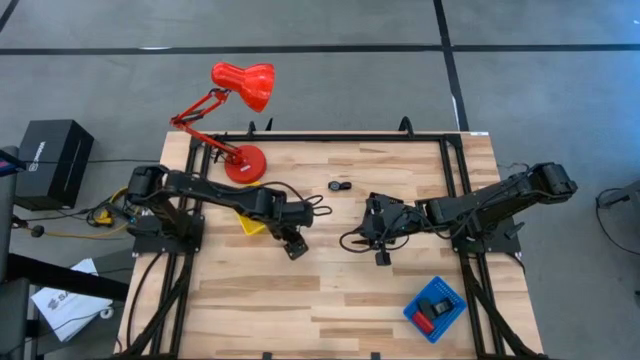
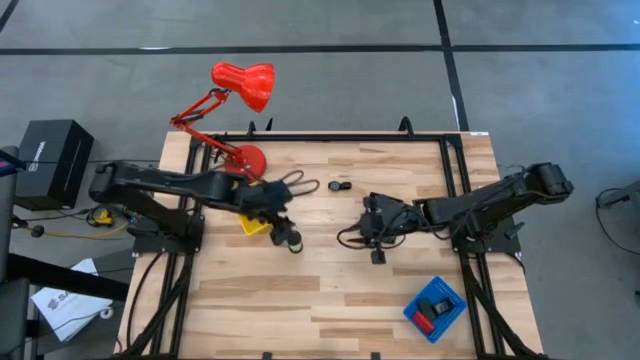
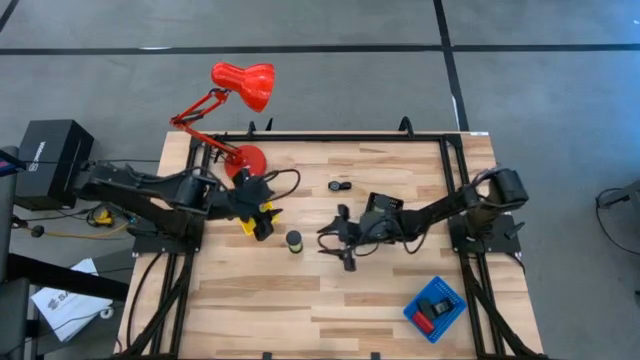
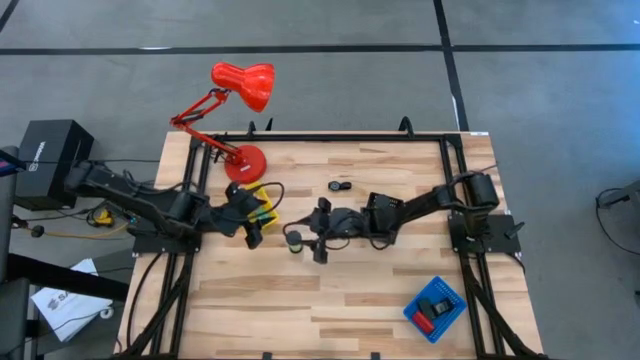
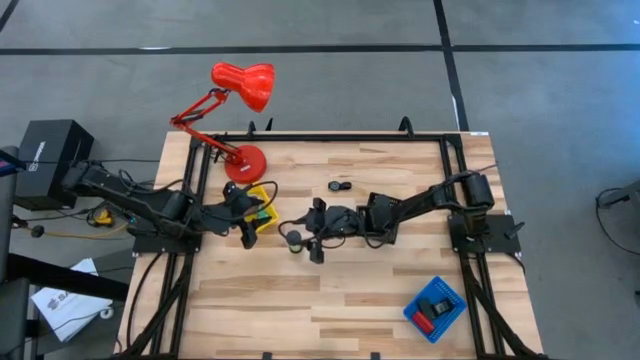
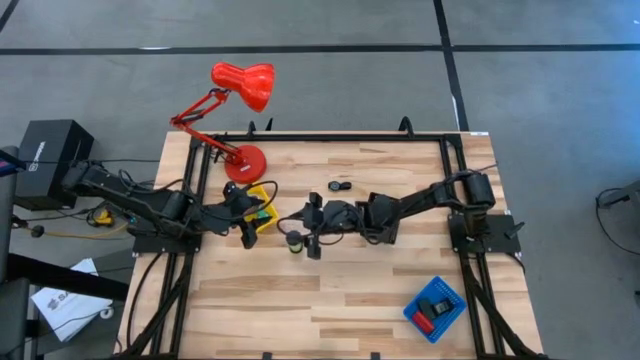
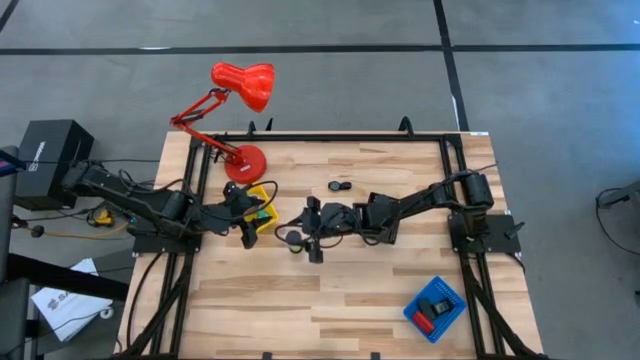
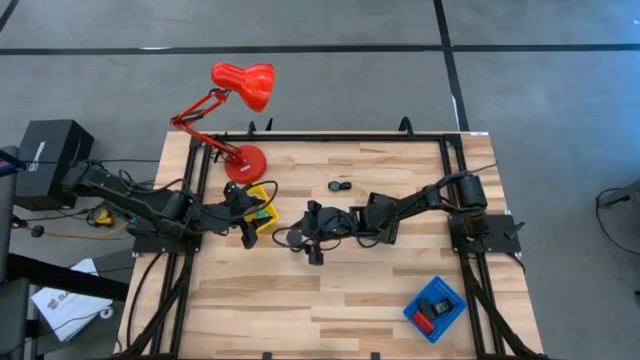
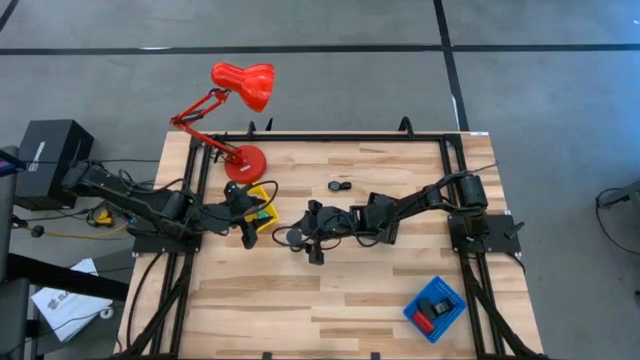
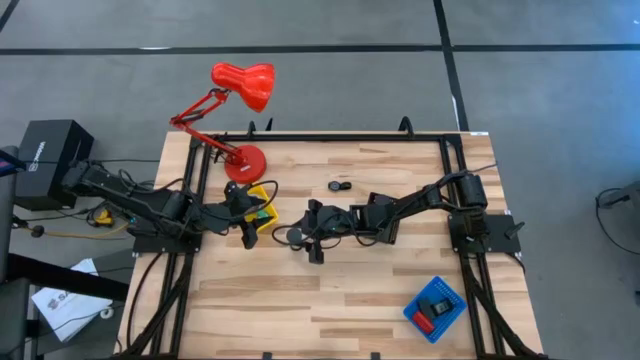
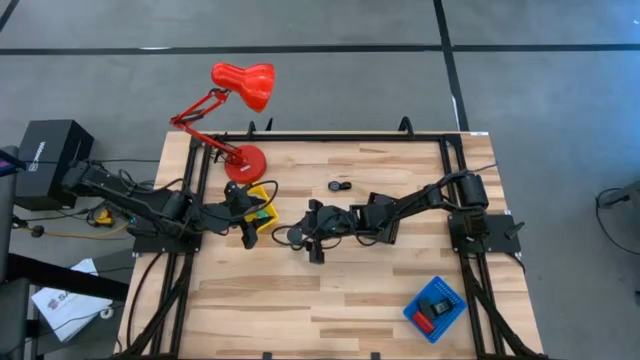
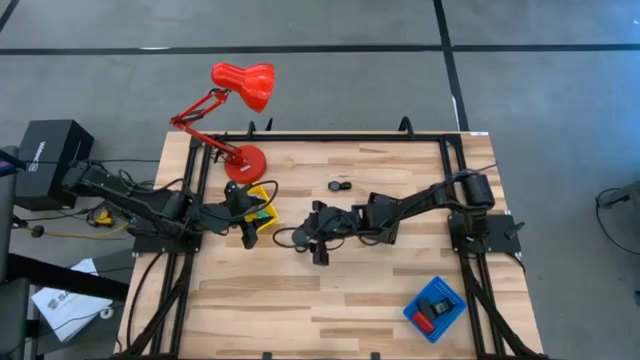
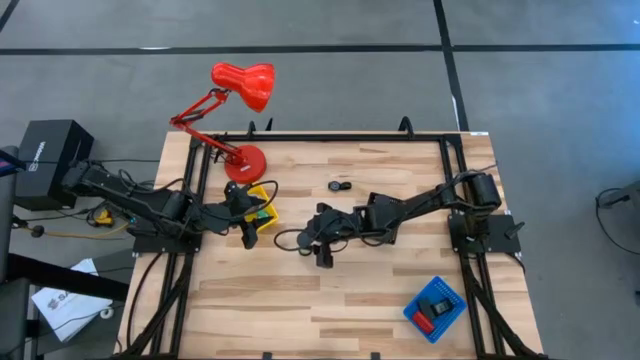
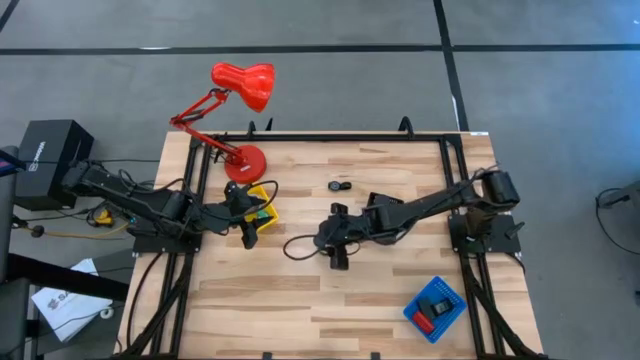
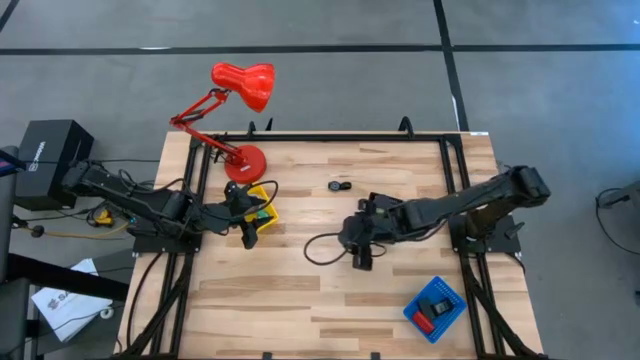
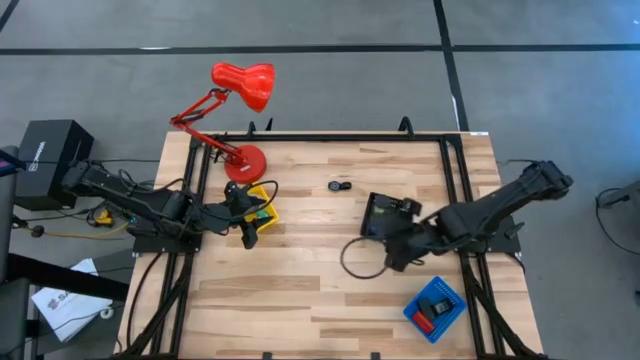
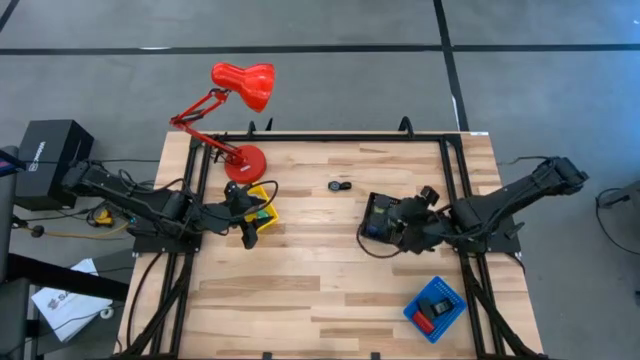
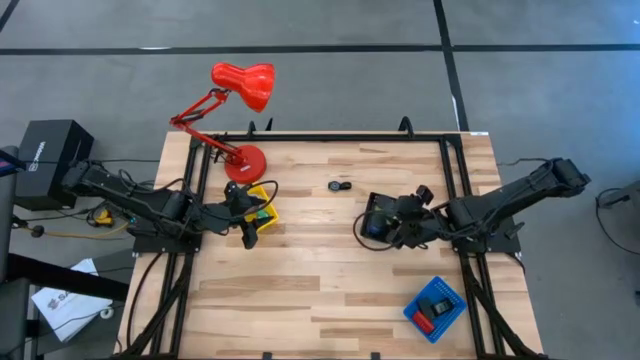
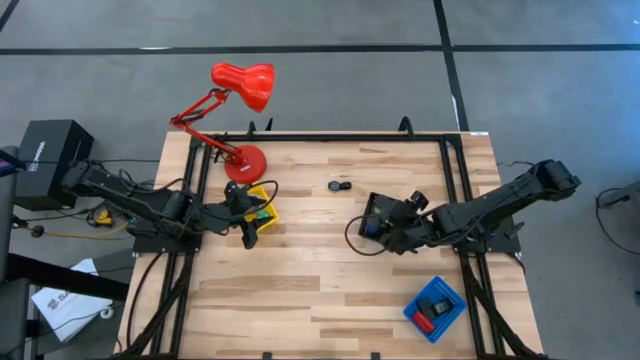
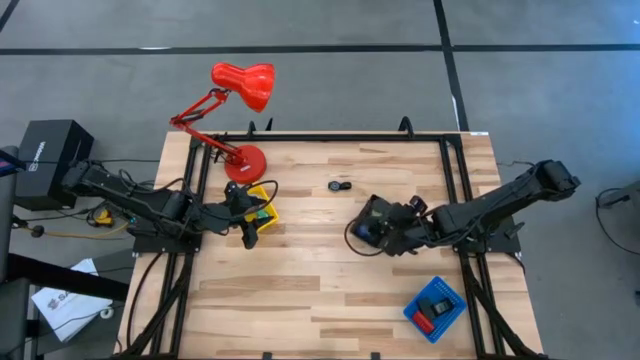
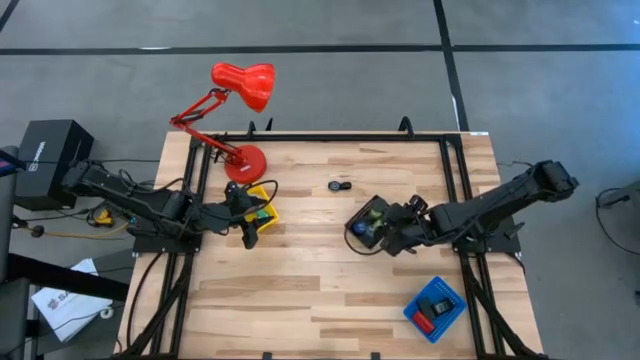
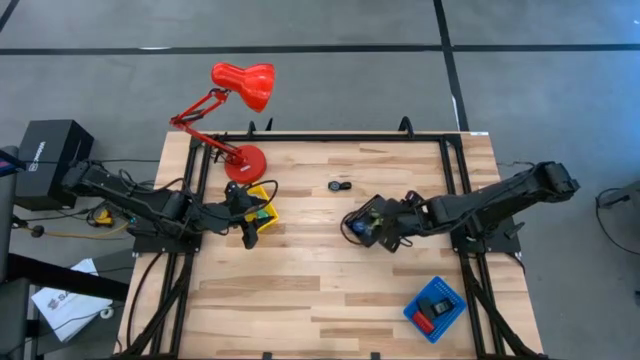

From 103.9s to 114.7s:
Task: Pick & Place Office items
Put the green hourglass into the black bin

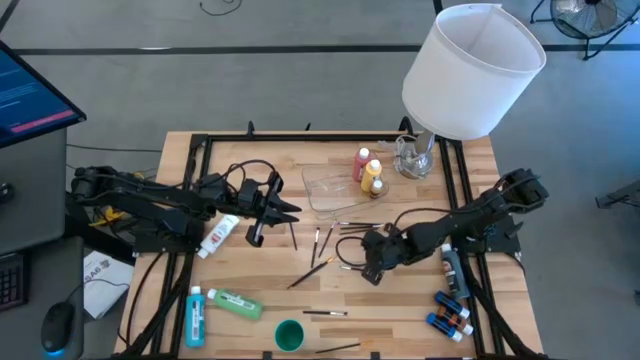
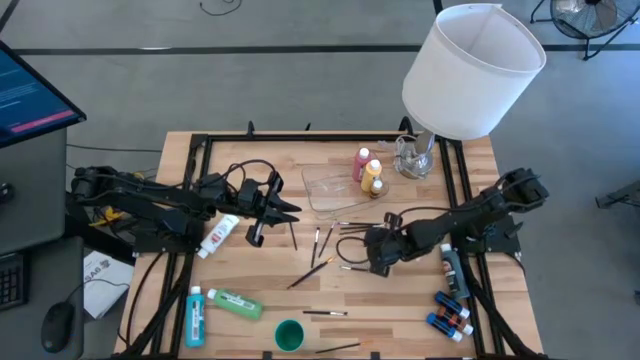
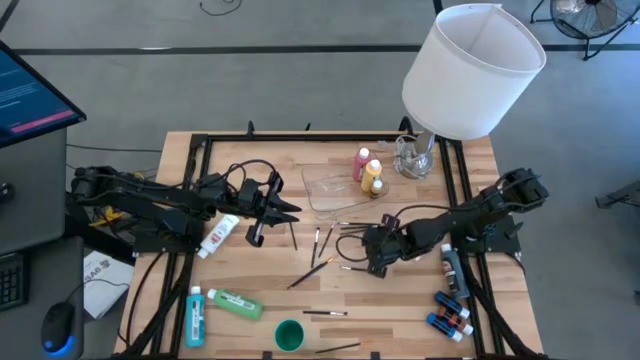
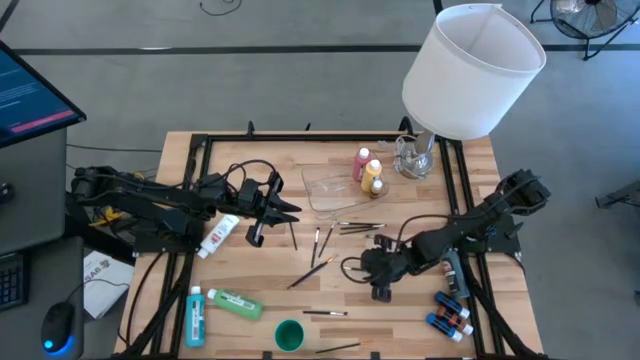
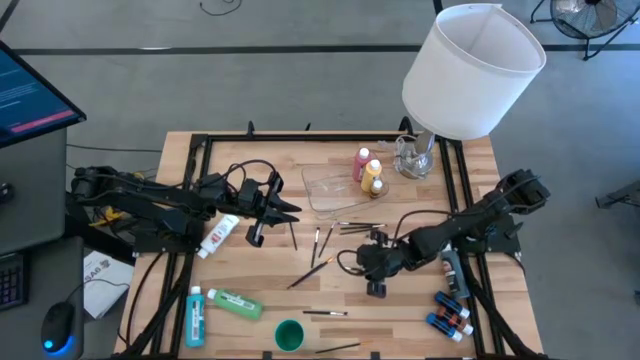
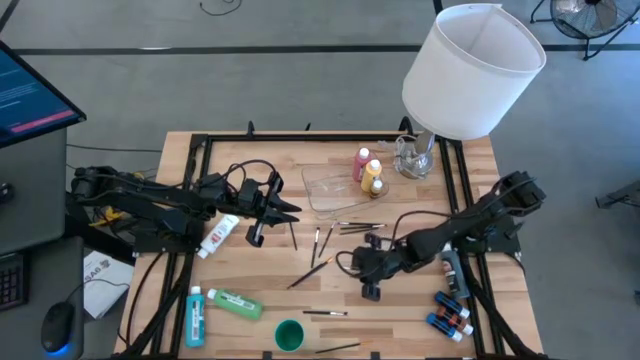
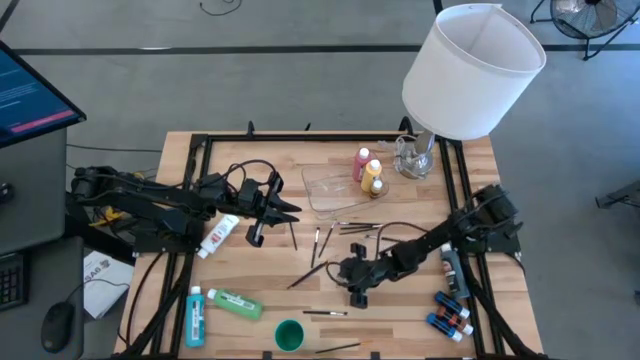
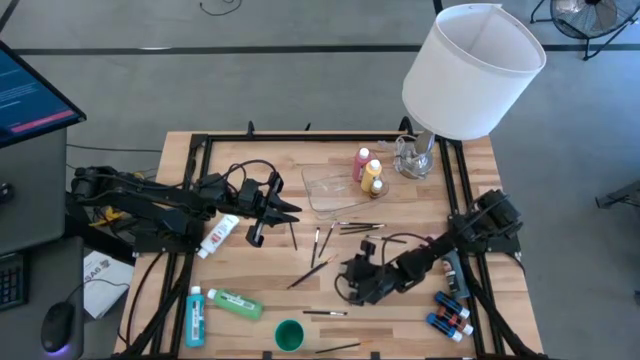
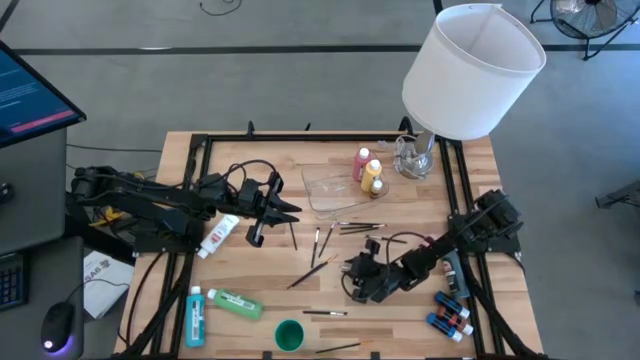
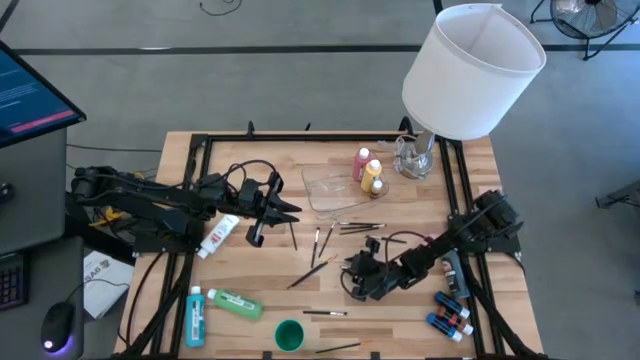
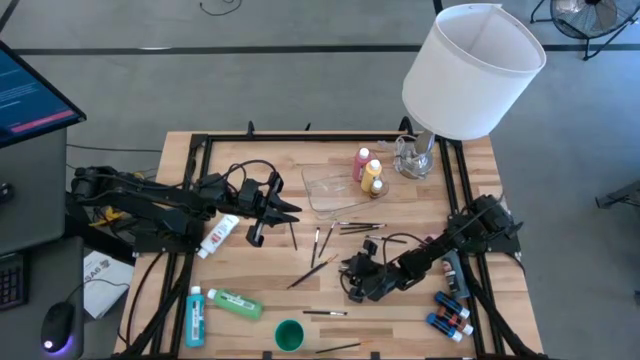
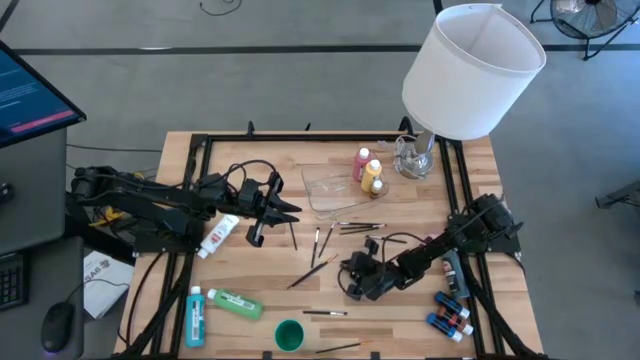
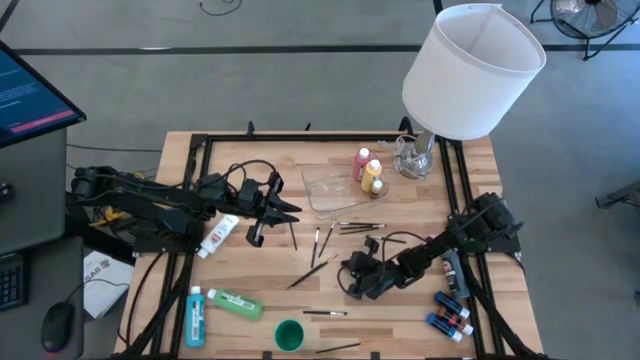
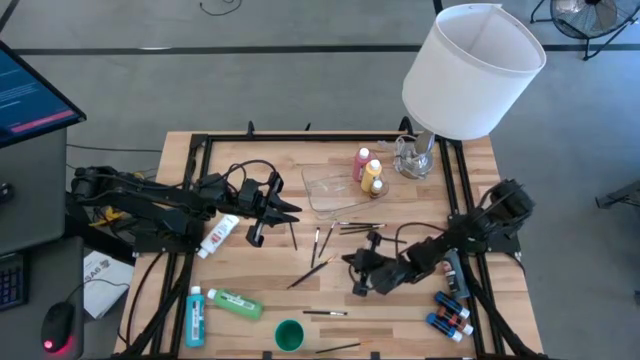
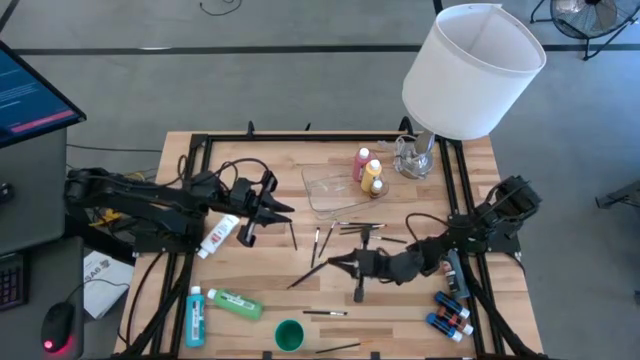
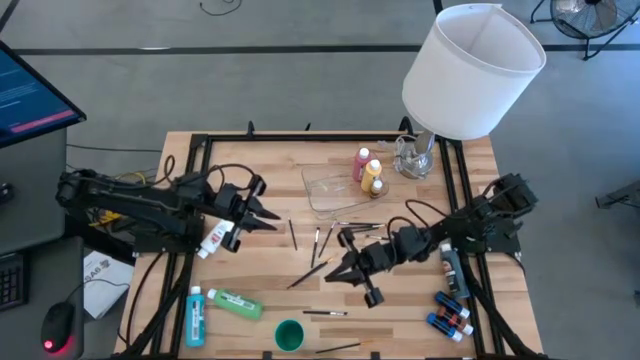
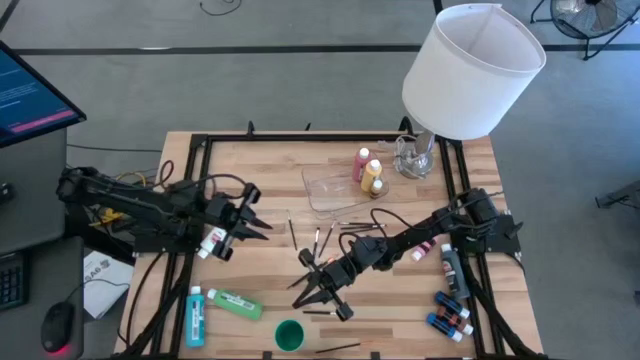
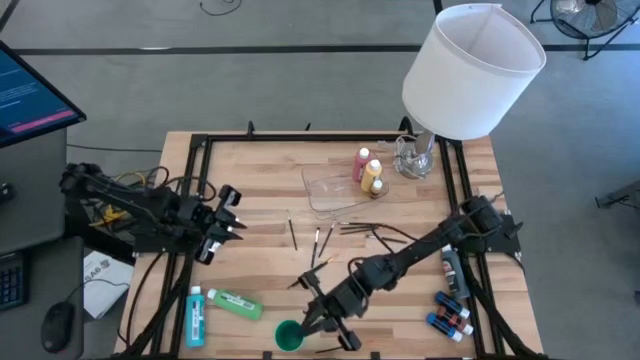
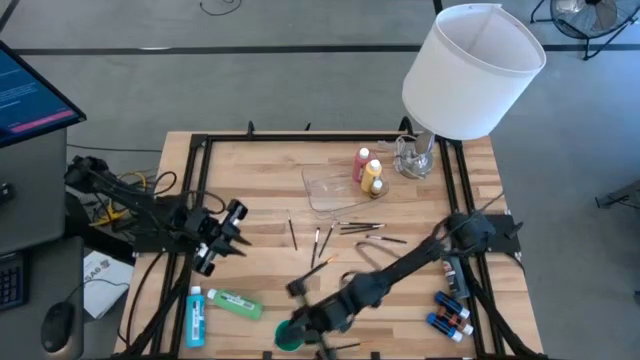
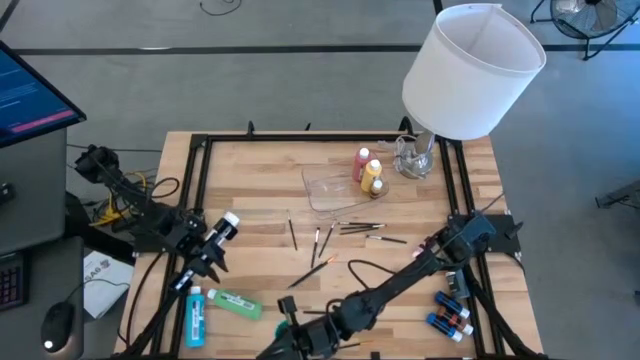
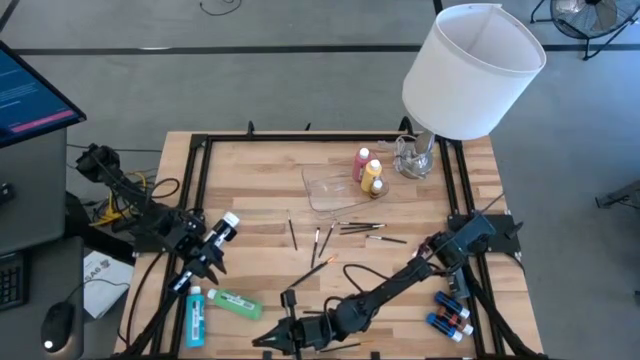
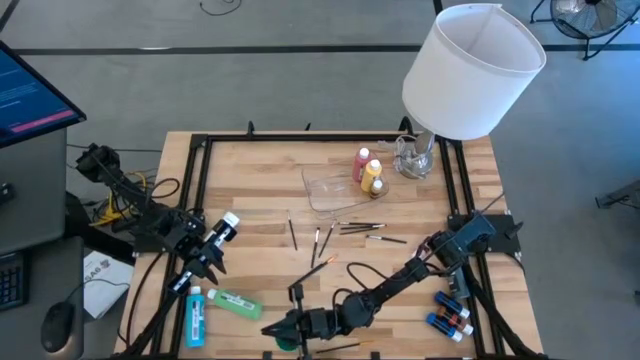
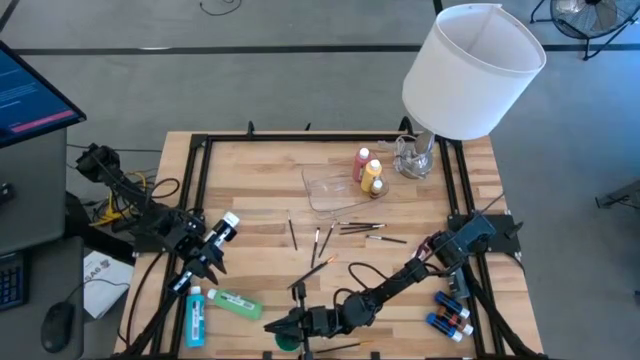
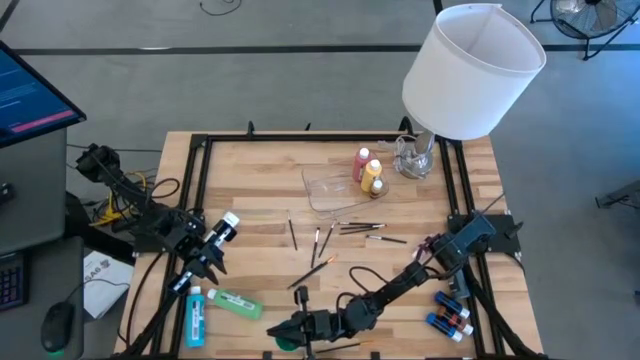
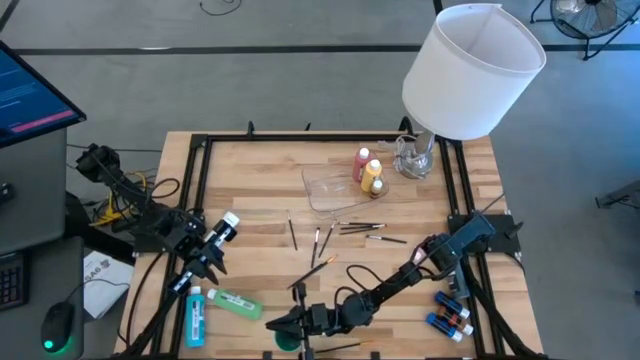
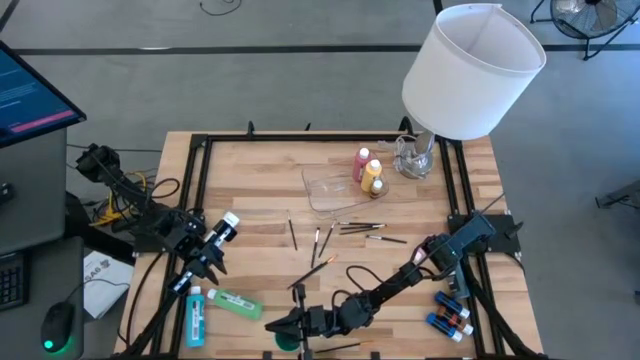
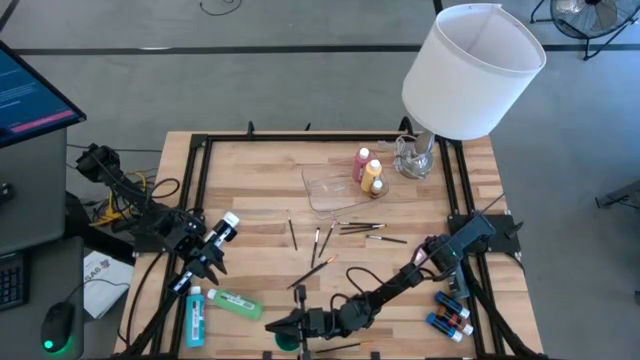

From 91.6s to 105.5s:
Task: Pick & Place Paint Supplies
Put the silver paintbrush into the green cup
